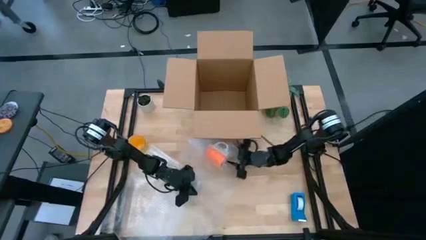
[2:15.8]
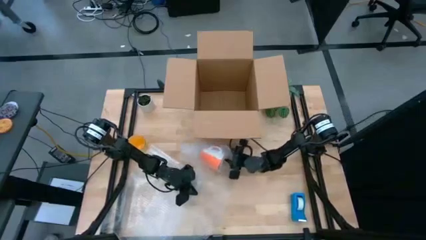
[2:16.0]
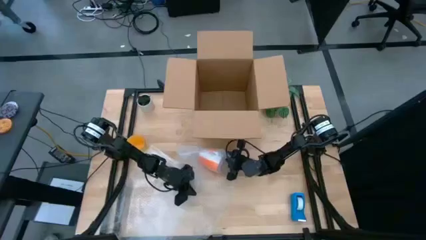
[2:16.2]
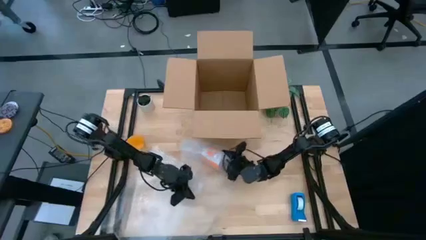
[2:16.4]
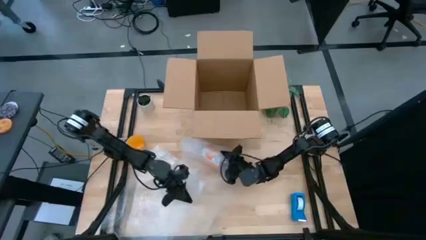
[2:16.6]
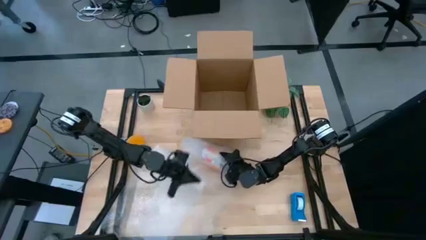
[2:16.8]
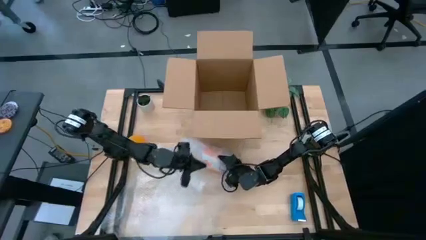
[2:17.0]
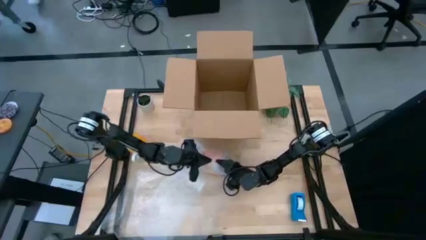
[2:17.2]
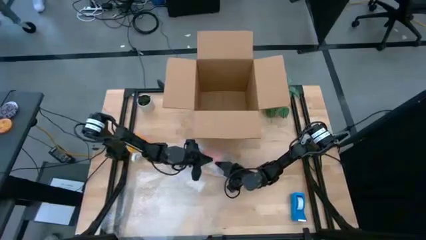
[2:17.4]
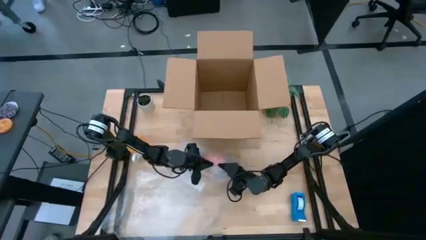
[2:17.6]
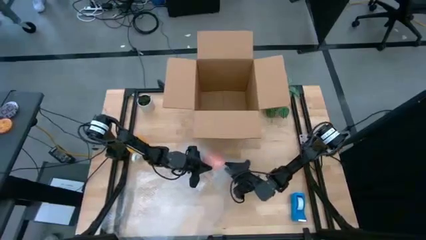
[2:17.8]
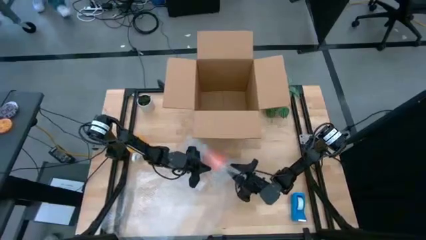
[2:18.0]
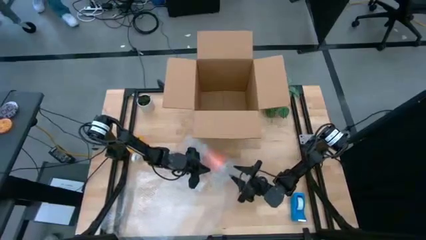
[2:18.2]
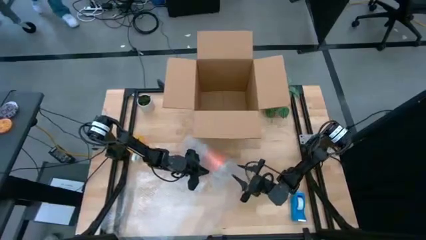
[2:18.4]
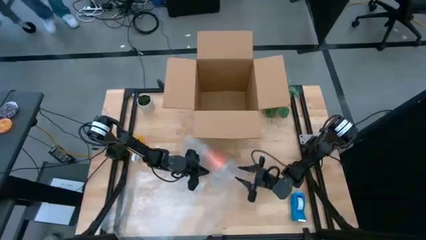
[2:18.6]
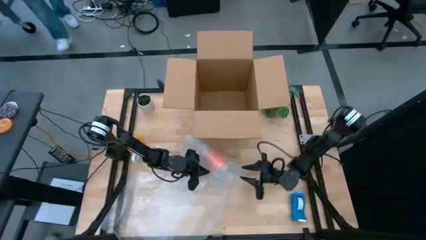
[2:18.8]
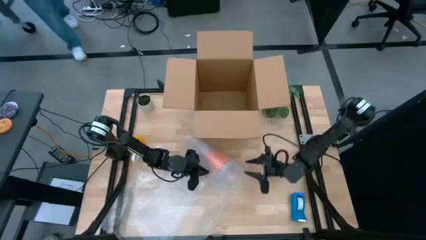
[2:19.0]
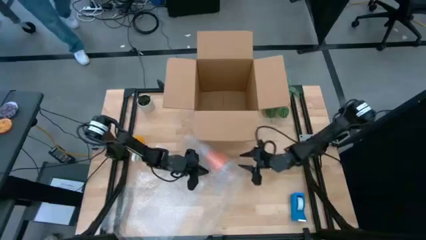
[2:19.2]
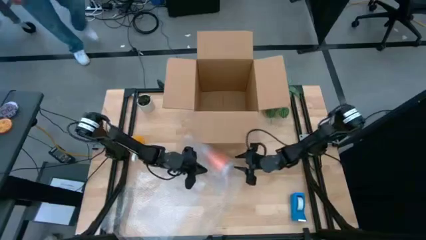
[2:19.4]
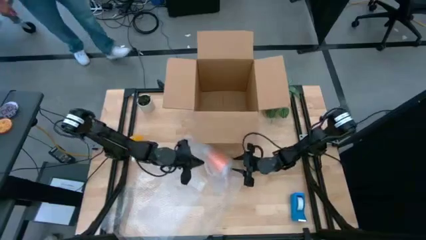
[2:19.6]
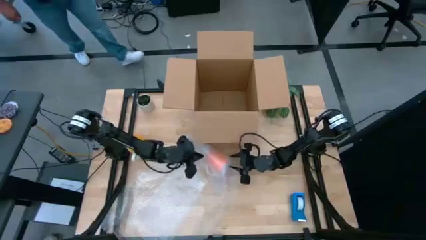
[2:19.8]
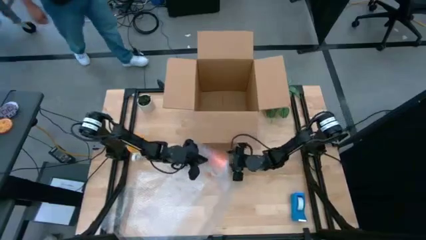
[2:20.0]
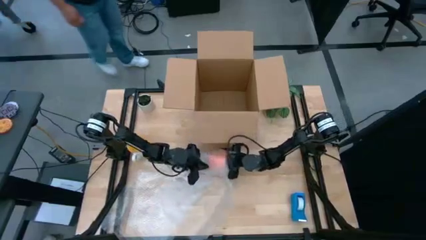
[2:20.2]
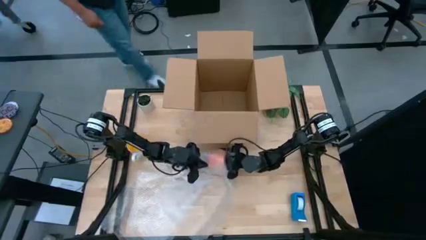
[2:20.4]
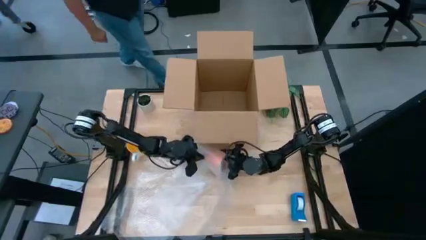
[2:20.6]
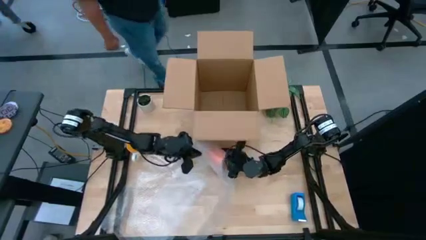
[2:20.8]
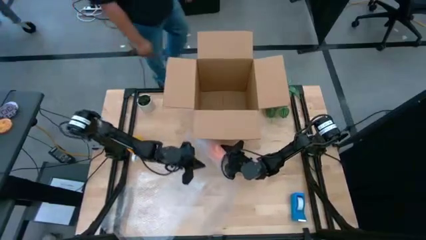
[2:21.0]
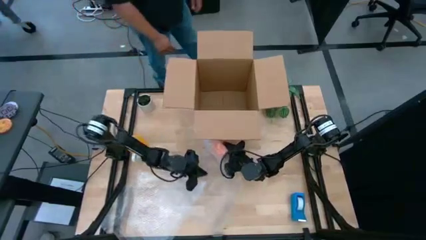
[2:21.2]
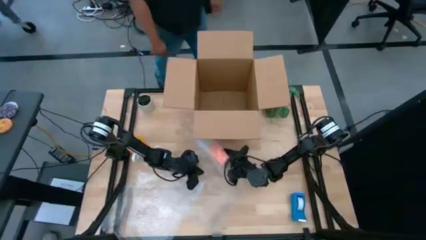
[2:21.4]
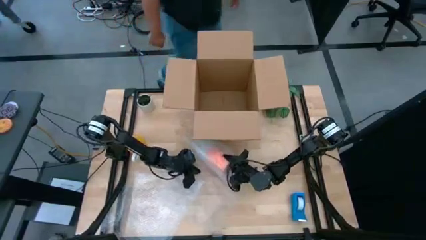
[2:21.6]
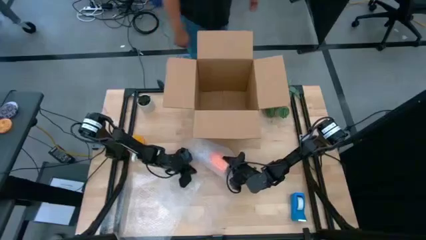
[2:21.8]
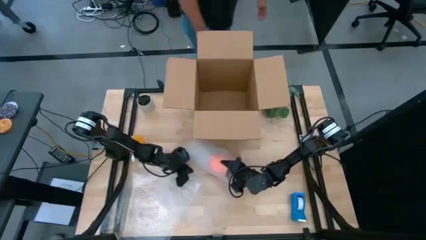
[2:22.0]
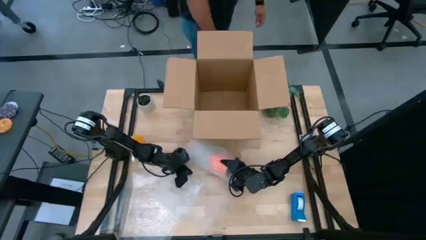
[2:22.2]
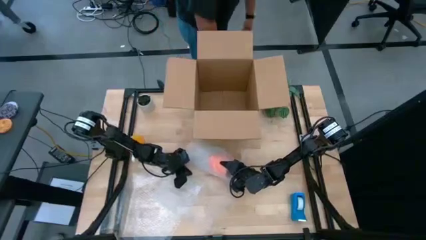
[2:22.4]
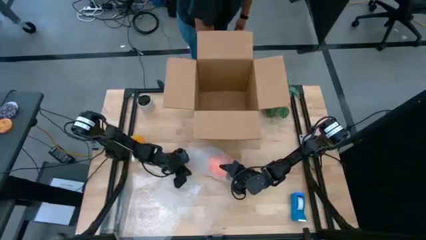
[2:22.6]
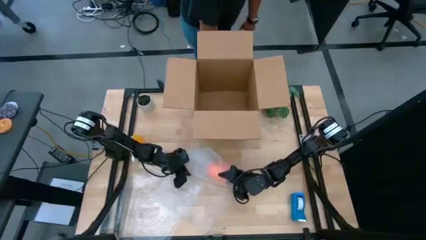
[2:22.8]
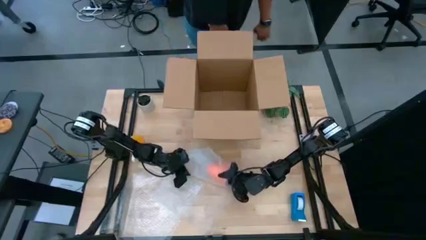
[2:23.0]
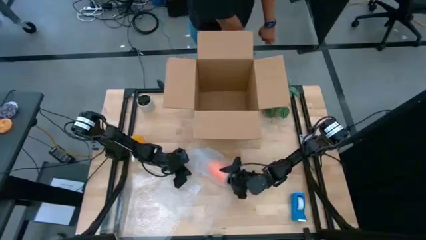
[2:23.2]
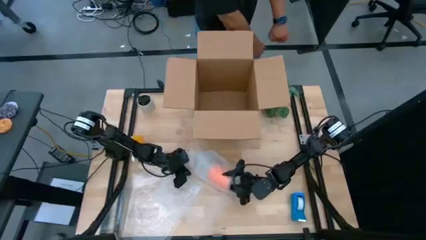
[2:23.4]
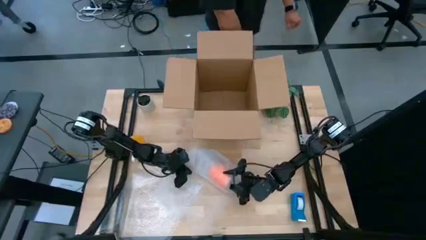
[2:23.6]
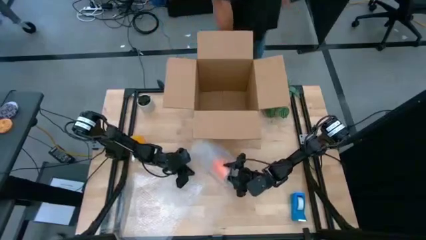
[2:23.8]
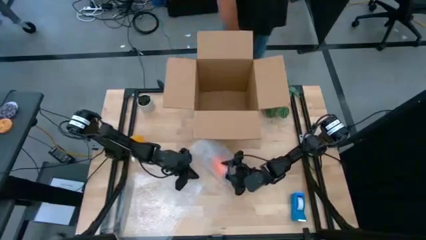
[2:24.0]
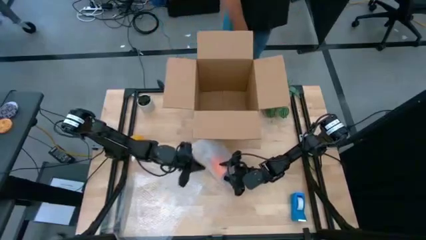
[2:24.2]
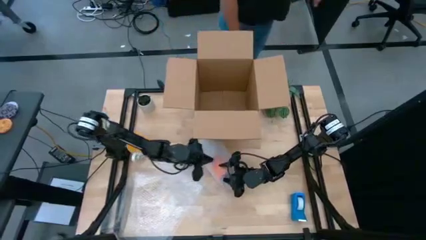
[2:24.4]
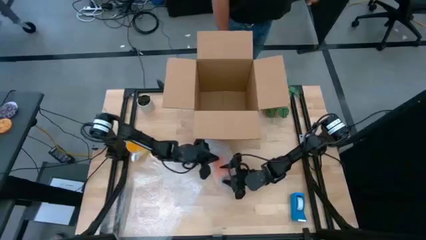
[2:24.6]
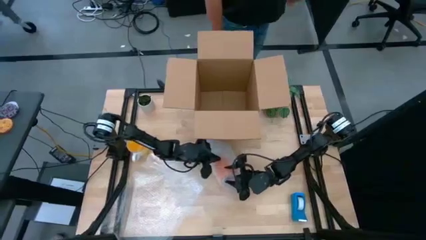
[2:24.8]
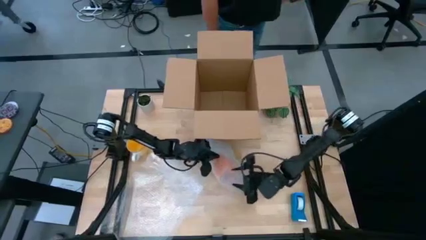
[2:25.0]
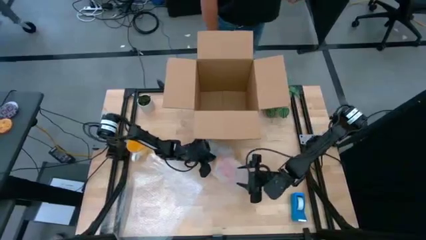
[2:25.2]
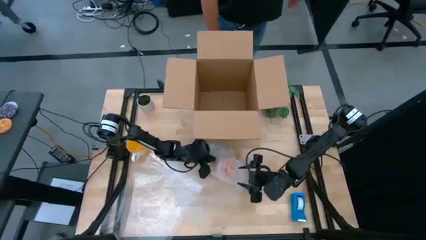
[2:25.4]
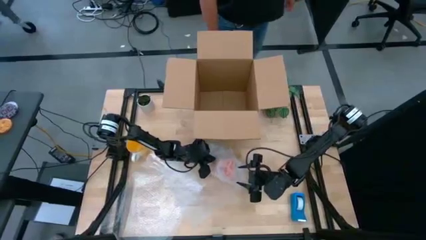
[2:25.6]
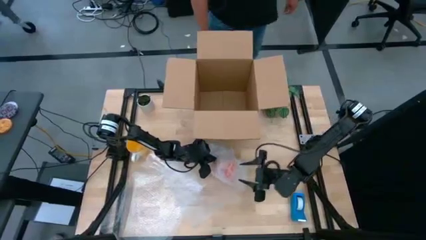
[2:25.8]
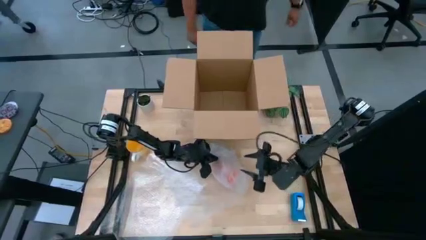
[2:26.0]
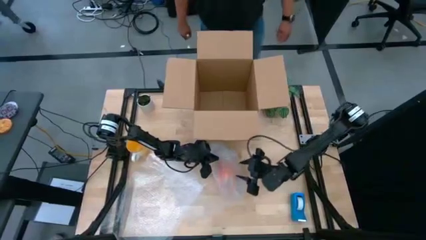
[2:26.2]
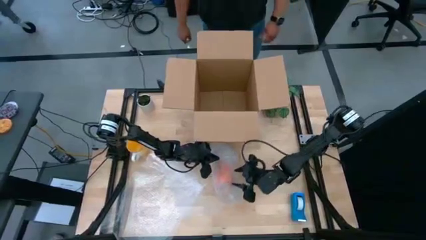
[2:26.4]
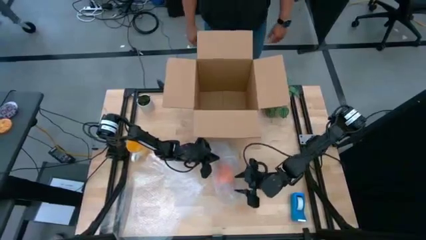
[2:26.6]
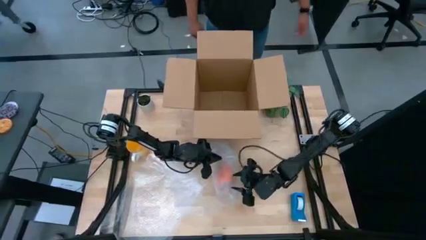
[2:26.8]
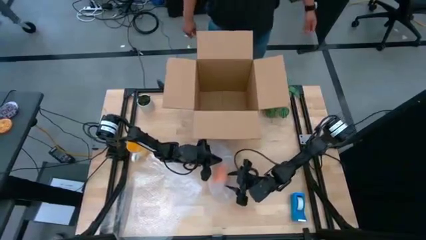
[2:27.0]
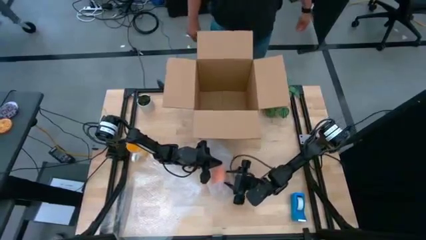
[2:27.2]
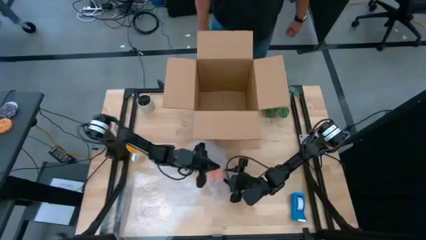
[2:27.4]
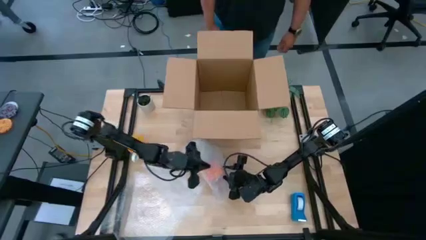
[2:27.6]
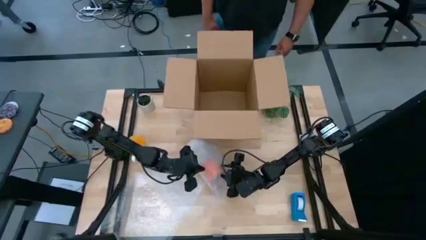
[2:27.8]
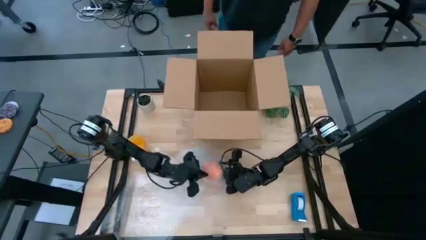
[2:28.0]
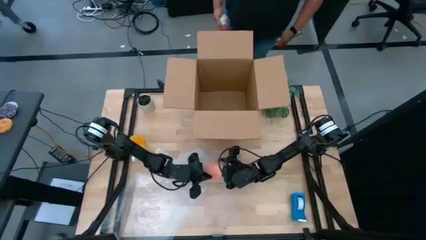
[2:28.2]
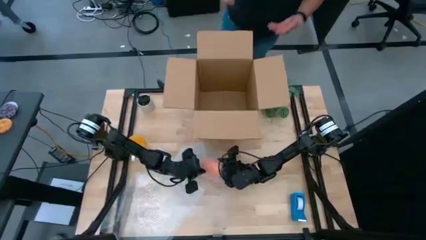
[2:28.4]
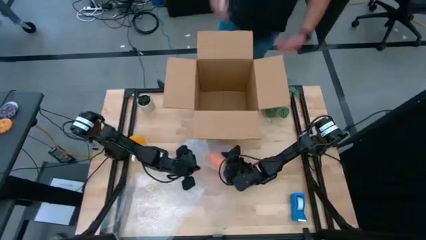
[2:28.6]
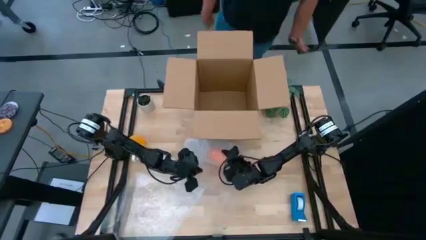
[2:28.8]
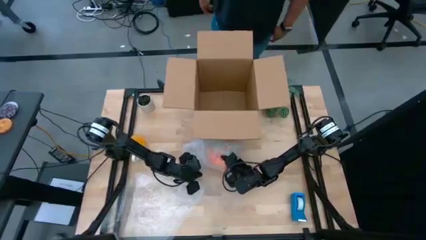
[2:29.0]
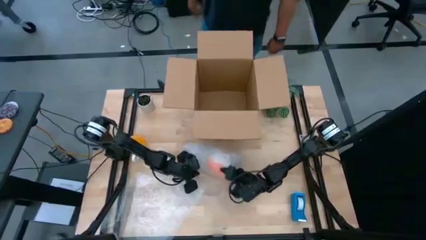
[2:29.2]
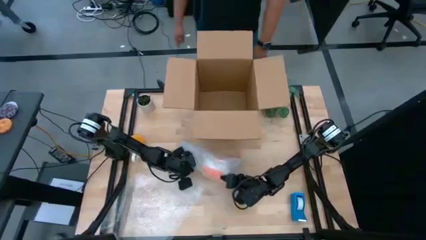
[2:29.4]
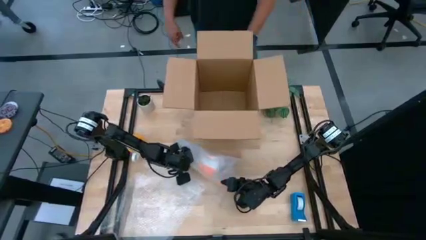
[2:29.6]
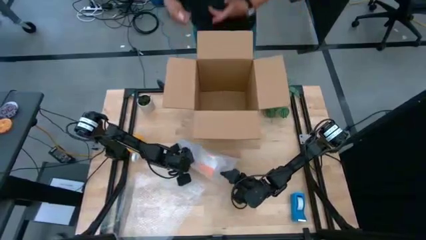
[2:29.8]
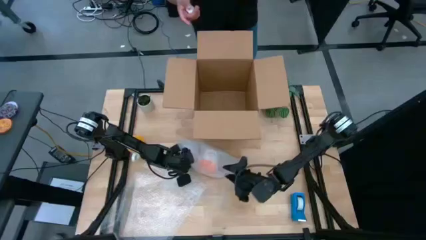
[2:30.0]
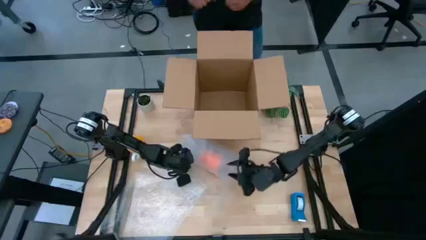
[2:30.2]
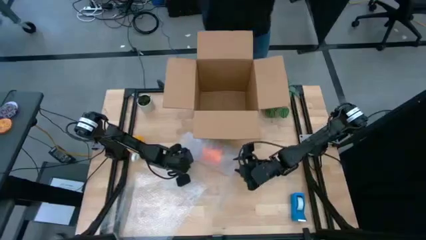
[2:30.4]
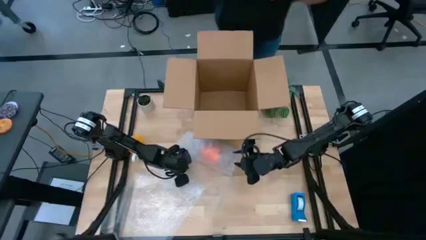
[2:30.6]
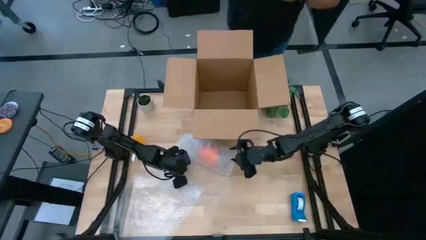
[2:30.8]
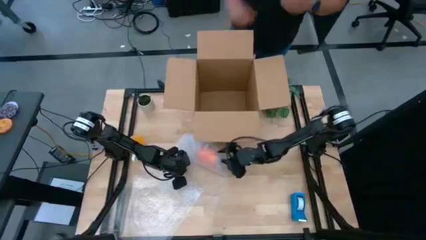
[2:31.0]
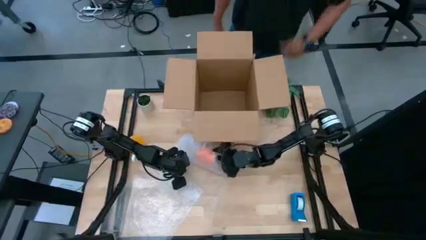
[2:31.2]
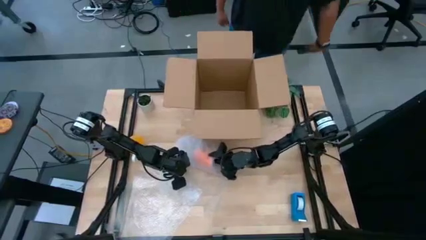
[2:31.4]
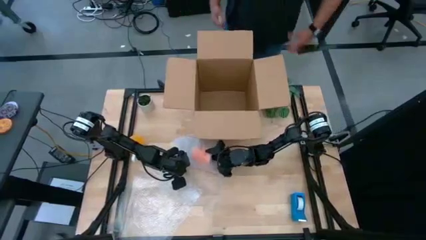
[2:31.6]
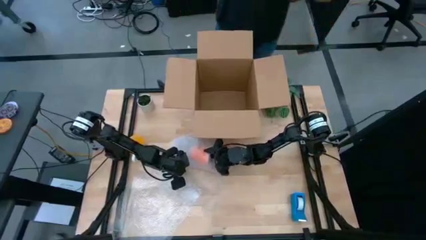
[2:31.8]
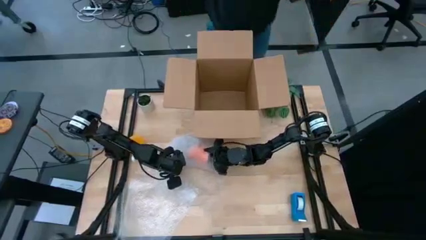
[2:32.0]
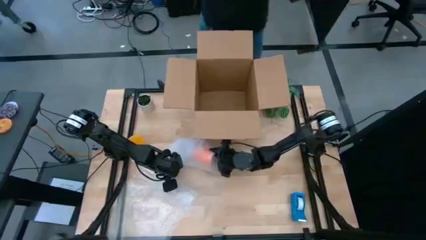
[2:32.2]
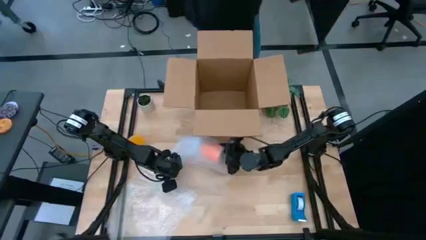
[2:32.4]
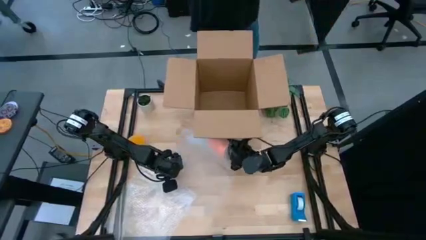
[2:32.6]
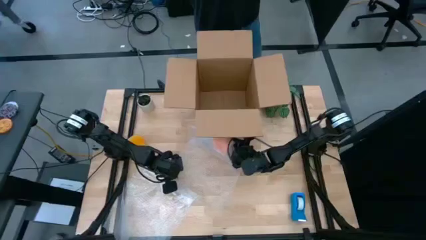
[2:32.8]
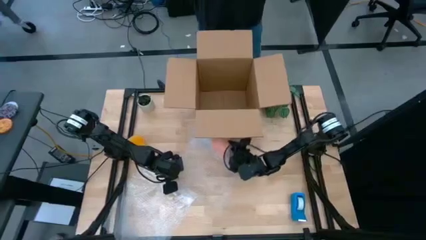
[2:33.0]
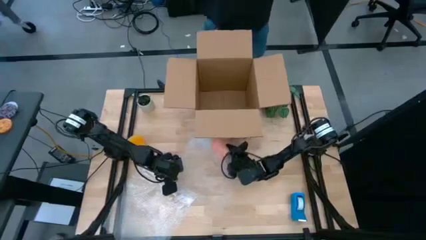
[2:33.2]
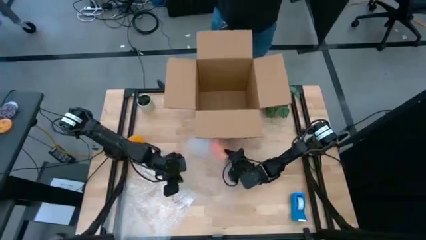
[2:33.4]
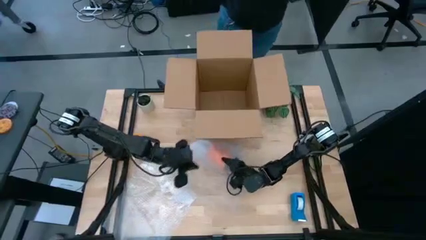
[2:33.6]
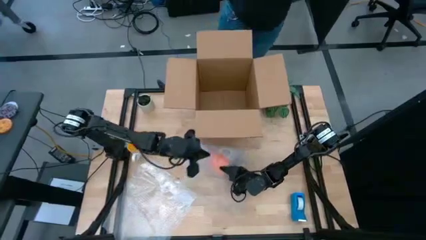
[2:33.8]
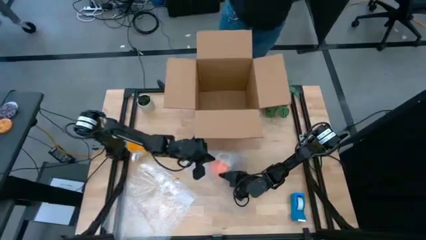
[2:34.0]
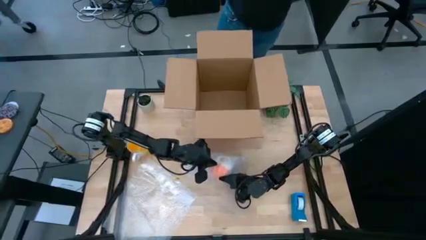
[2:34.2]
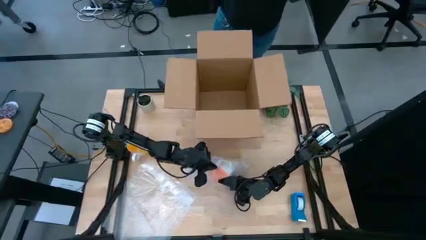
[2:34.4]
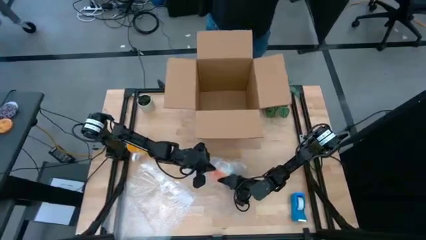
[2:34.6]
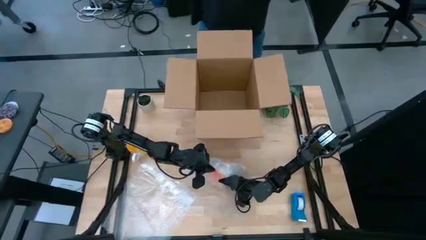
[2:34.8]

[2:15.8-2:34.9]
Task: wrap mug
Wrap the orange mug with the bubble wrap
